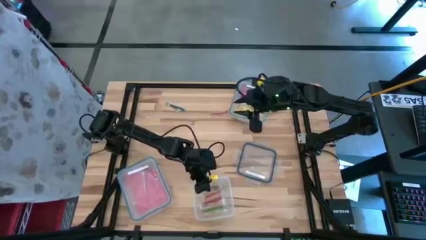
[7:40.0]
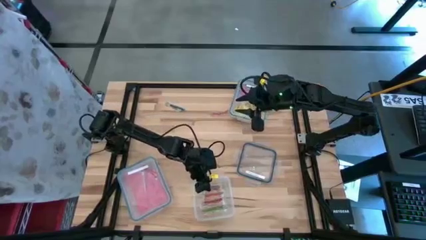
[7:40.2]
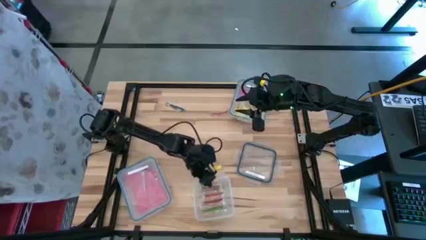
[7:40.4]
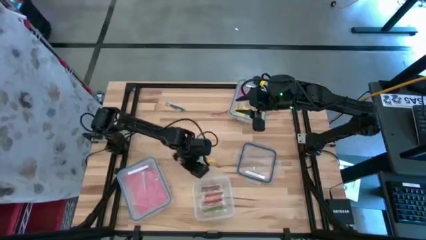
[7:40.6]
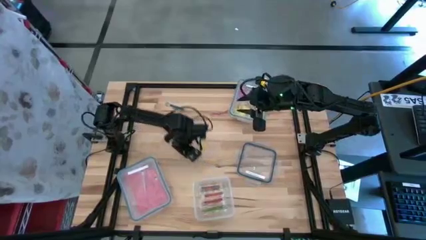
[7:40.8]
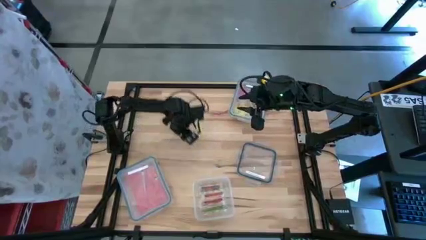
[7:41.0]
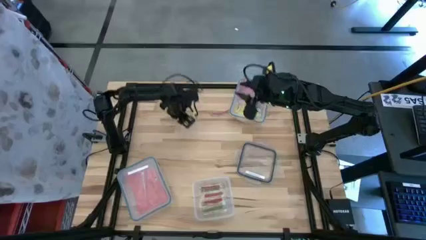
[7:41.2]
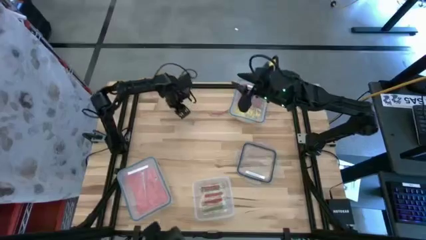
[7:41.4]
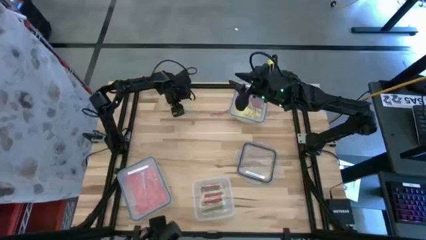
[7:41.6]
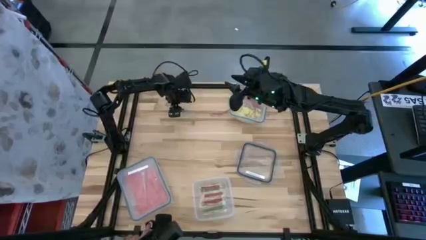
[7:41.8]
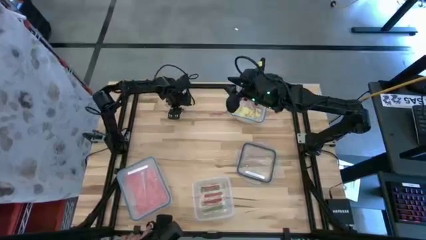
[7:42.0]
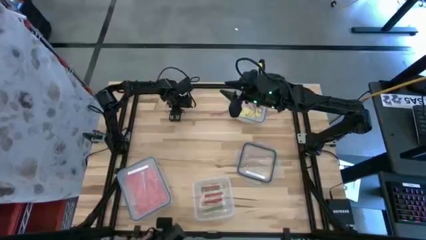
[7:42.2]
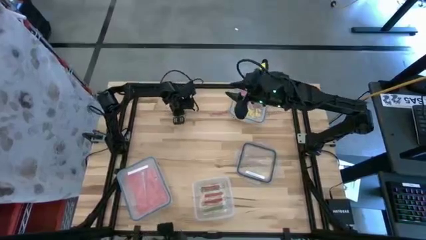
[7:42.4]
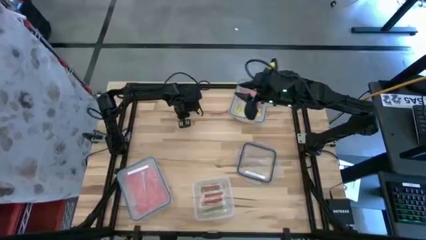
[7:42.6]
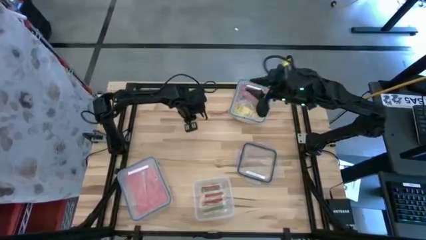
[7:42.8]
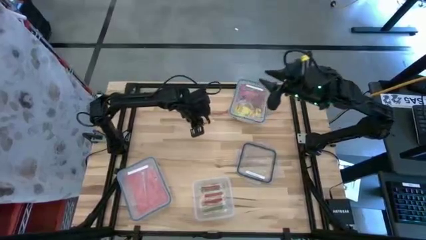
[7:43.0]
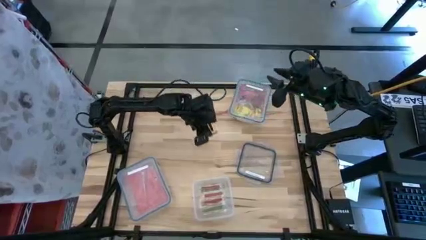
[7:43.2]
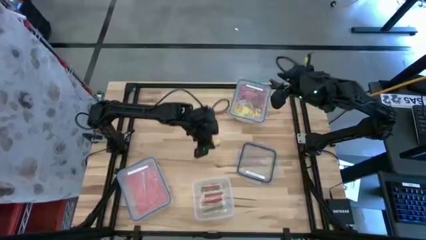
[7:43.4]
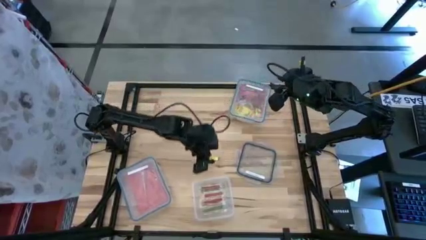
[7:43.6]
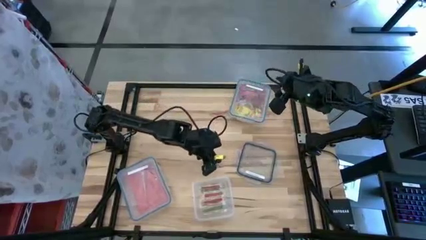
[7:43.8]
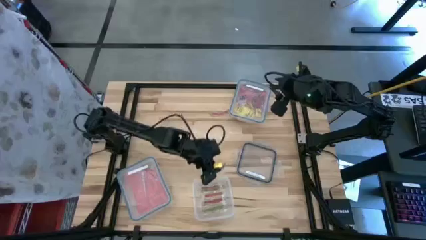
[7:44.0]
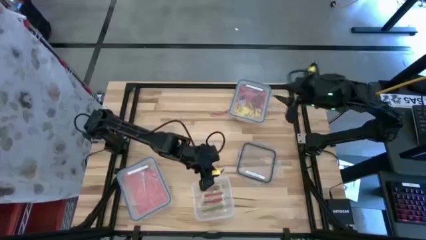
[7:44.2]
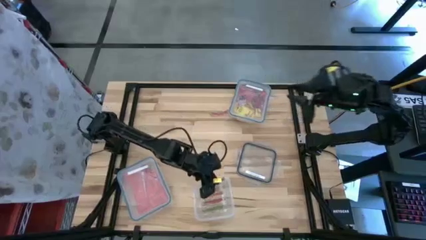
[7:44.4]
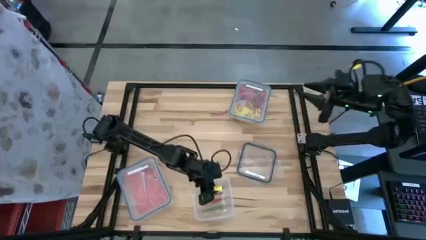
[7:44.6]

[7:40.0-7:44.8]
Task: Sort candy
Put the blue candy stick into the square transparent bin

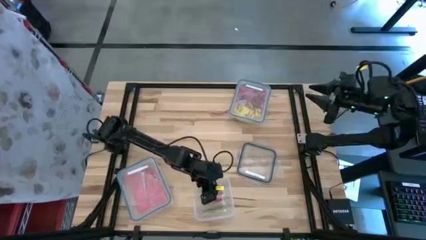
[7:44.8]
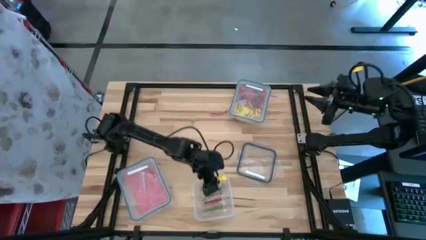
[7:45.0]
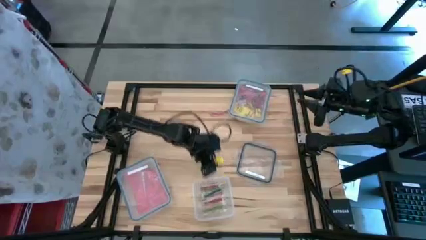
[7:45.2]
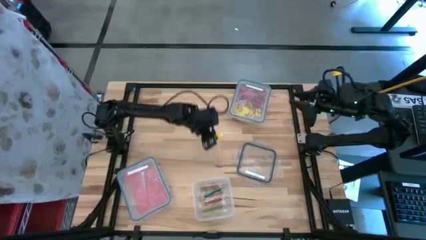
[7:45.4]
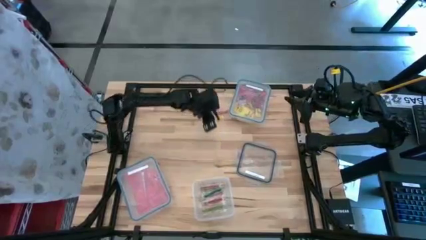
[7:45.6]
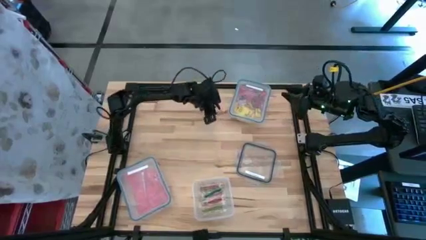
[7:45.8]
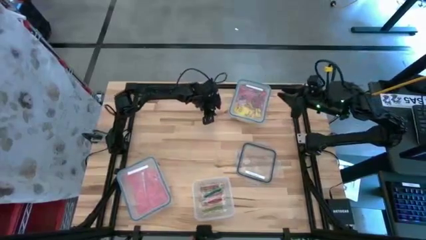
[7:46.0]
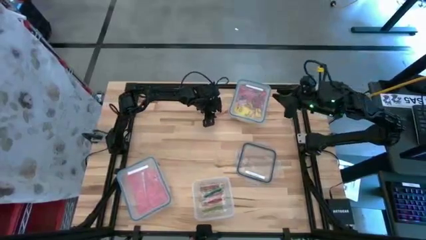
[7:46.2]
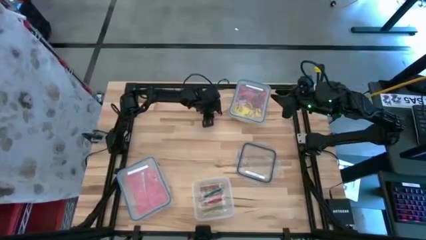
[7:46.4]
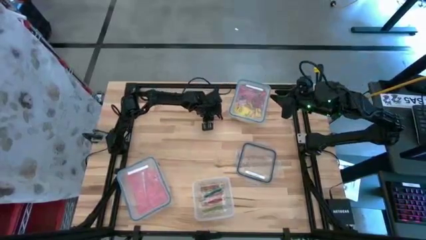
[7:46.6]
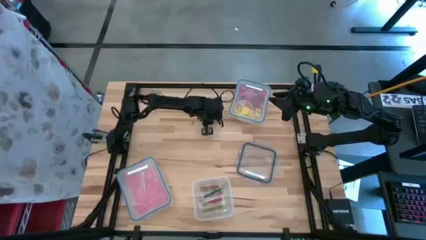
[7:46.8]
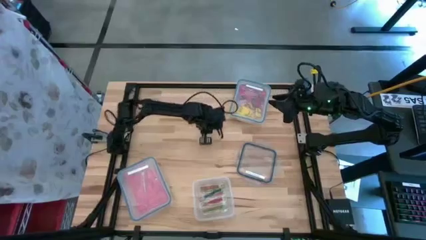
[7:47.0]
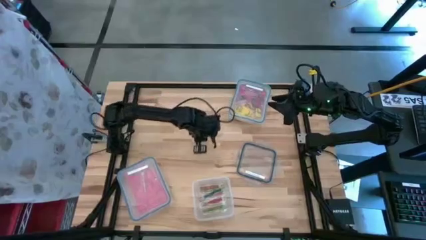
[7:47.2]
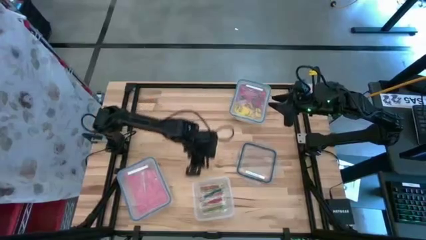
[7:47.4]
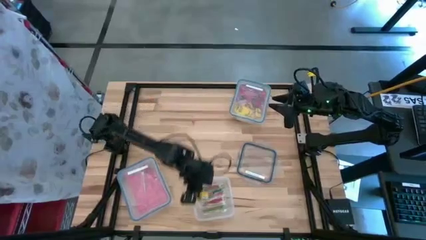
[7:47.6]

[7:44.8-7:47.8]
Put the red candy stick into the square transparent bin

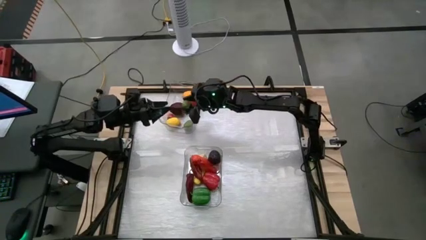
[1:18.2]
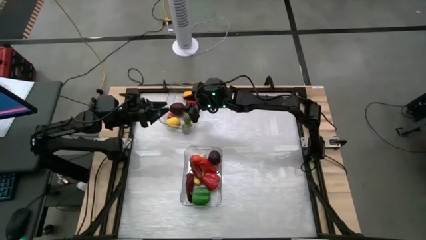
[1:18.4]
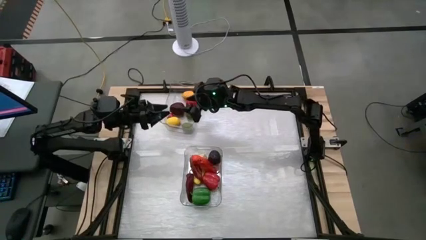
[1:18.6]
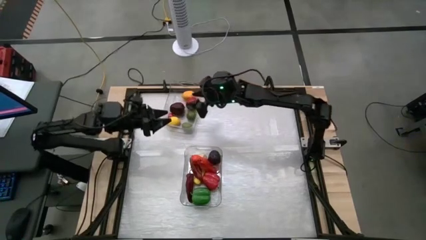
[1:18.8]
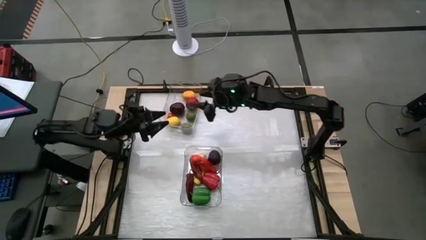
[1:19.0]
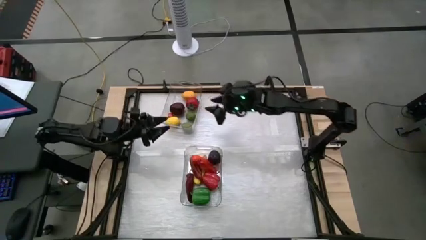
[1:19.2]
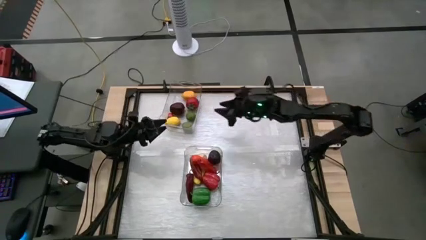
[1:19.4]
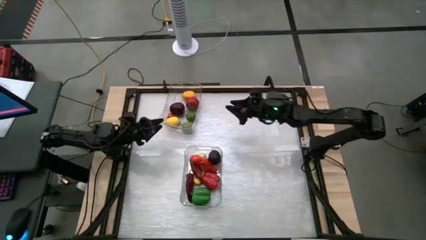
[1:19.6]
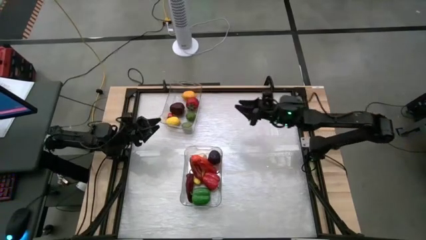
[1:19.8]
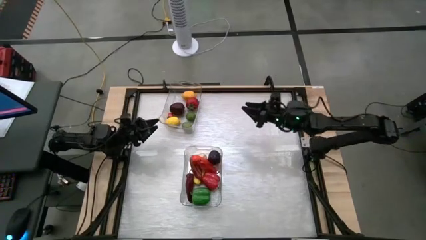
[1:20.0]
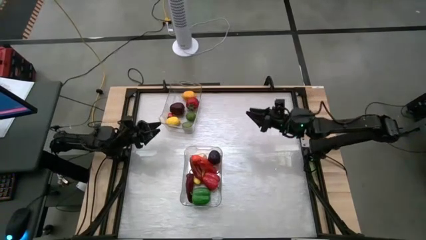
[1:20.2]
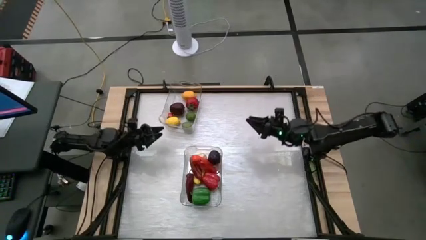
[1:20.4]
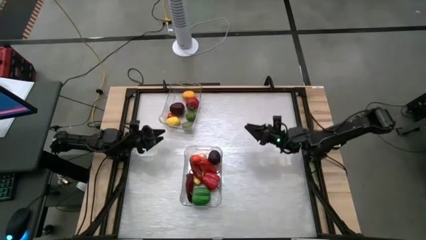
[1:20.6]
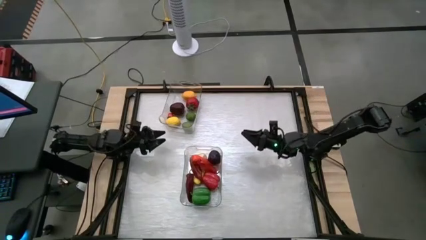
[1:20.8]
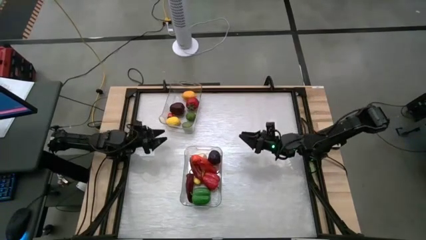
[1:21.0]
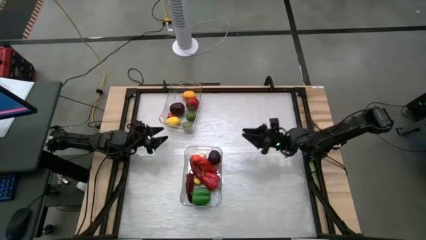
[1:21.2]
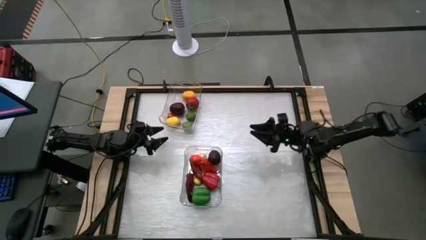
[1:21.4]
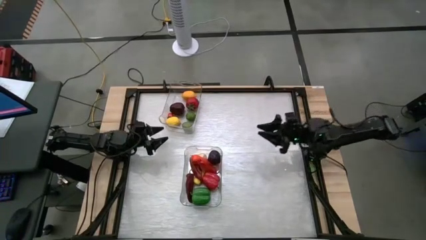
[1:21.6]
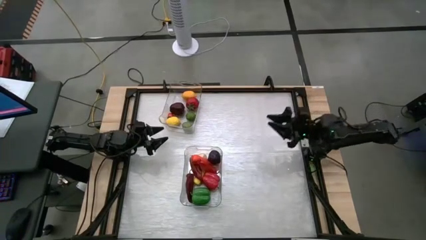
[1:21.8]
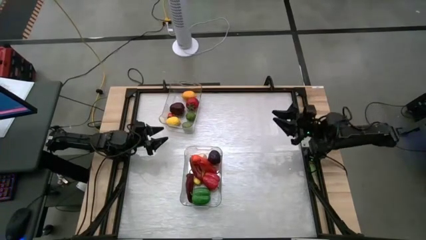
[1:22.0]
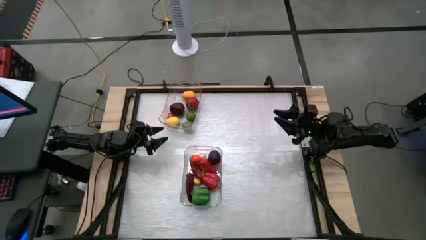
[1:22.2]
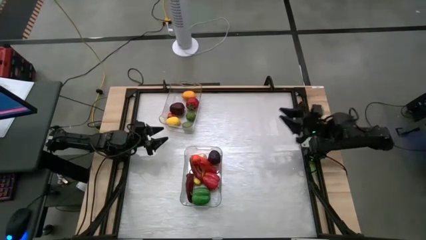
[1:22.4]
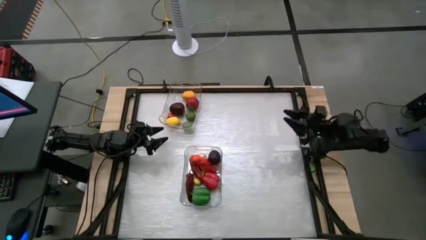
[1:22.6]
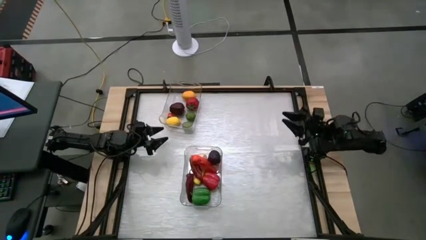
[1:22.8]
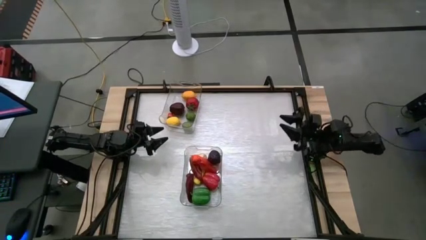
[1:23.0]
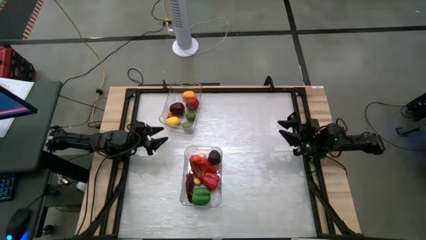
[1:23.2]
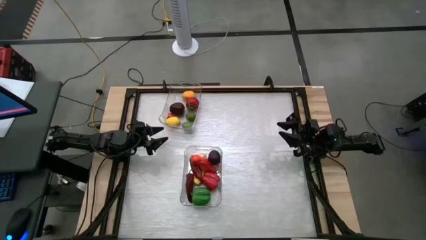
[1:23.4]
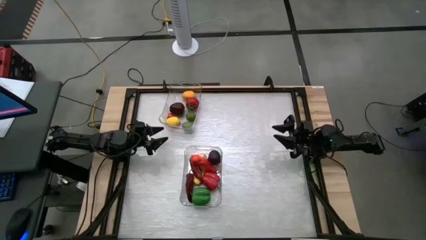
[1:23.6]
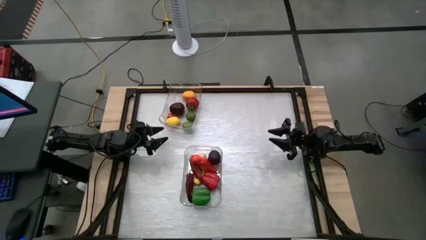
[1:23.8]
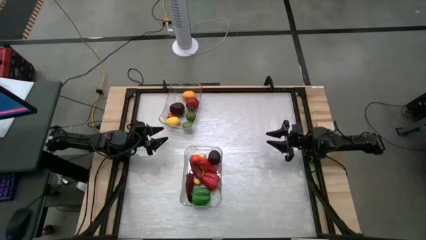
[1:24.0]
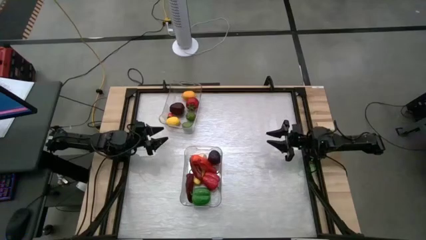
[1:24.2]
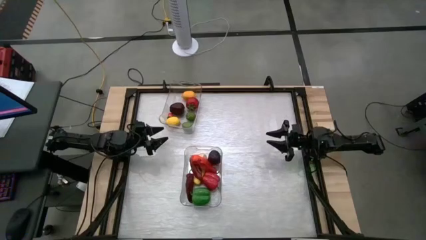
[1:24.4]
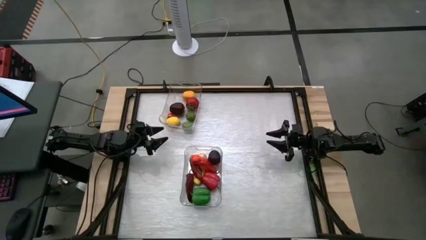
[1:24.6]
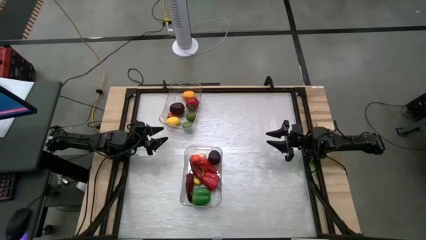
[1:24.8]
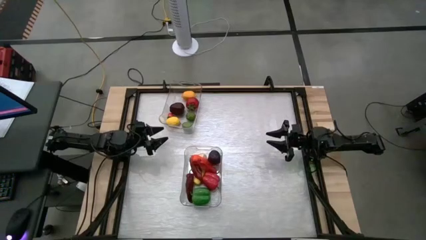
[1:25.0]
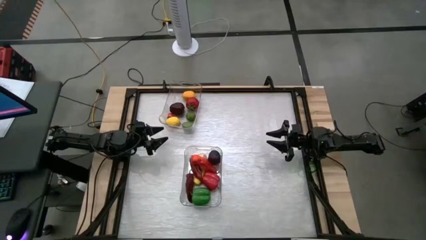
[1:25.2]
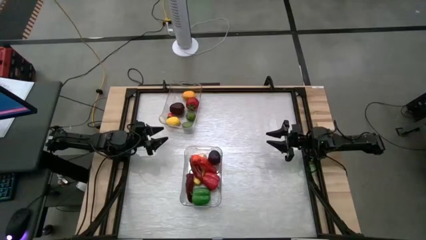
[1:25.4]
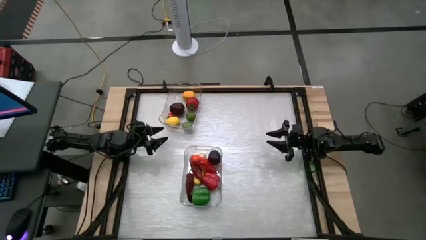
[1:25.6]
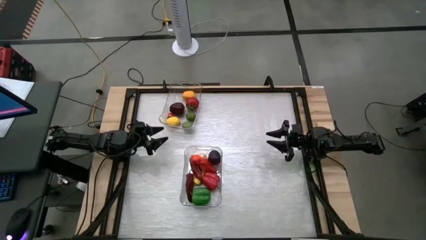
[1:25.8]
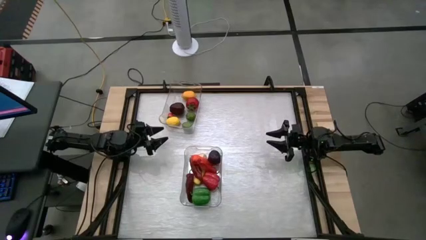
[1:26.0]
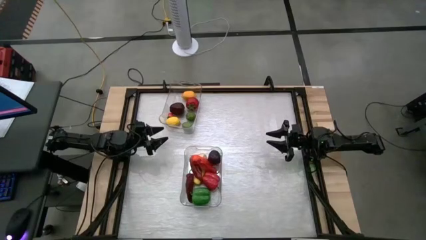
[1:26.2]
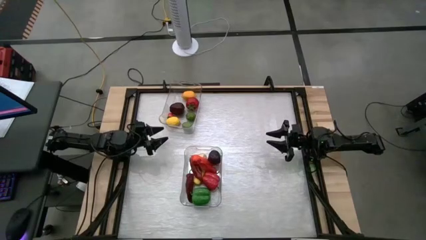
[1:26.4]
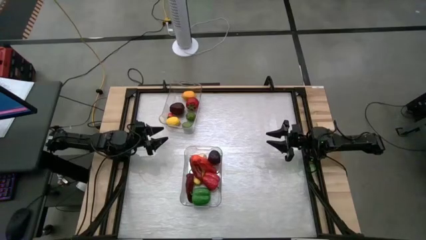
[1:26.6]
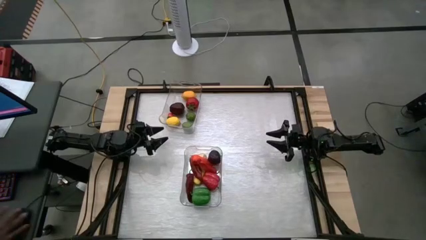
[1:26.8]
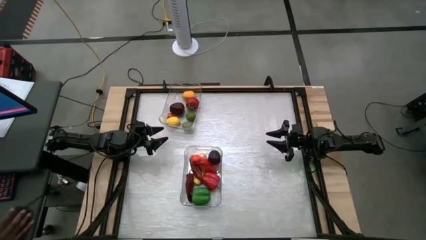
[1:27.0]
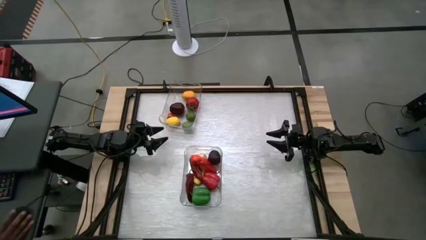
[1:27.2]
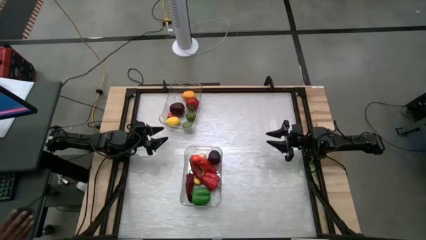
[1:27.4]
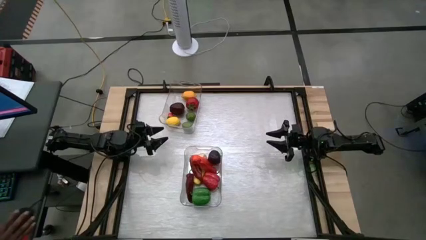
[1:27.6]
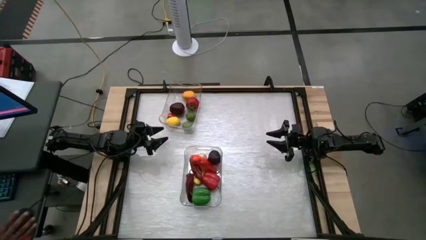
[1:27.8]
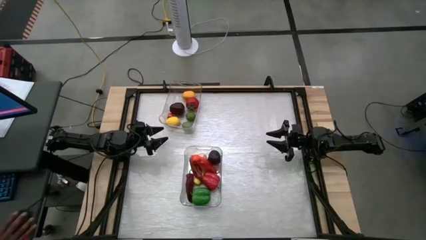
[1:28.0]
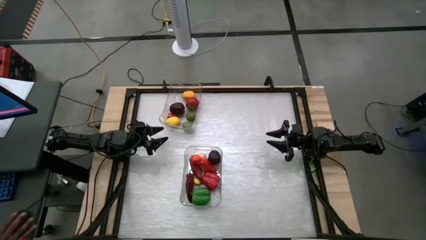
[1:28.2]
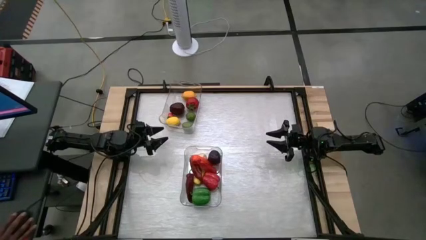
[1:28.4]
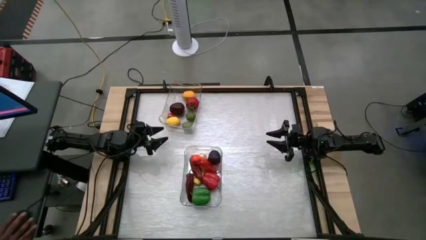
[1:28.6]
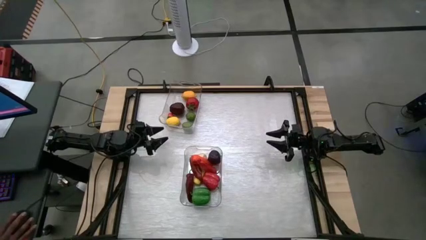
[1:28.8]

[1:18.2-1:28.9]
Task: Sort produce into baskets
Return to Home Position
